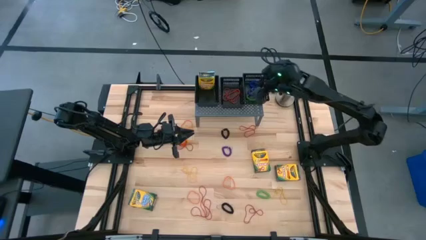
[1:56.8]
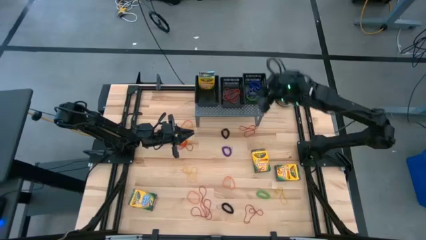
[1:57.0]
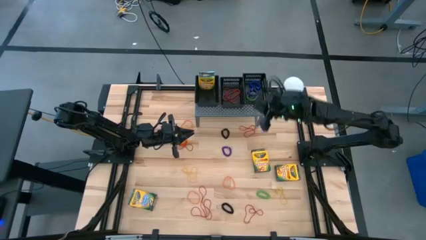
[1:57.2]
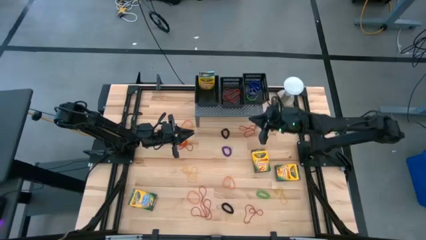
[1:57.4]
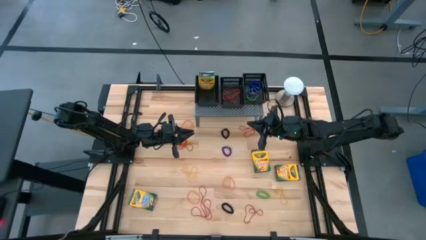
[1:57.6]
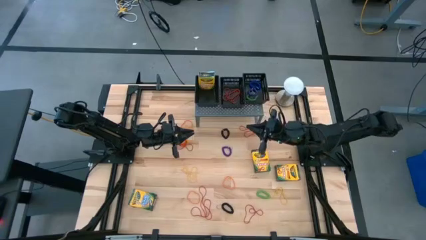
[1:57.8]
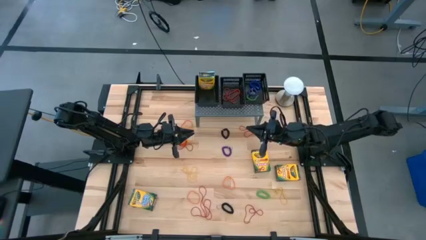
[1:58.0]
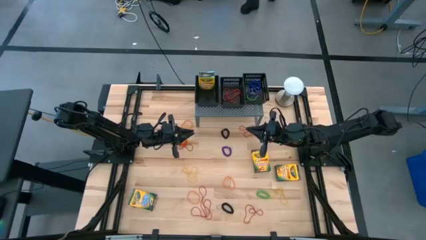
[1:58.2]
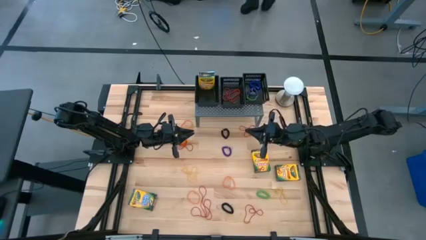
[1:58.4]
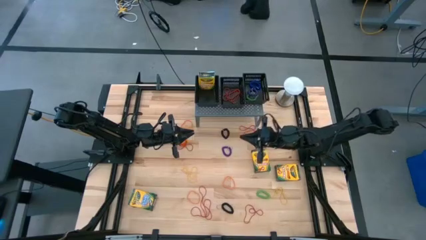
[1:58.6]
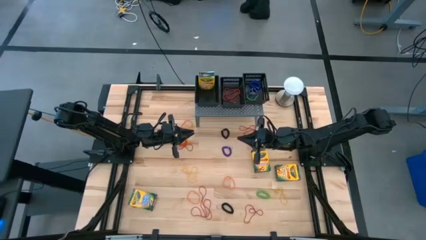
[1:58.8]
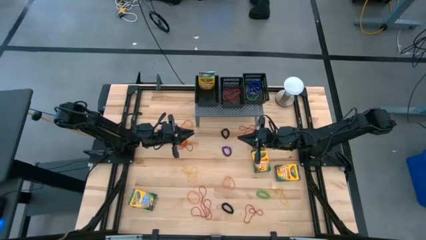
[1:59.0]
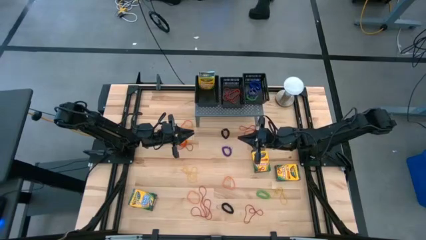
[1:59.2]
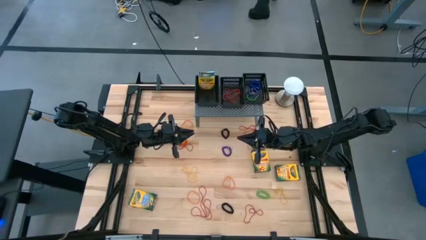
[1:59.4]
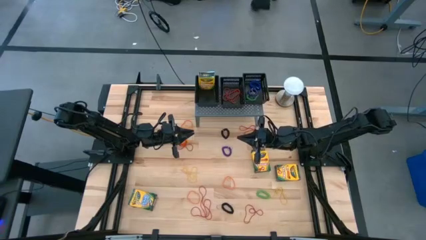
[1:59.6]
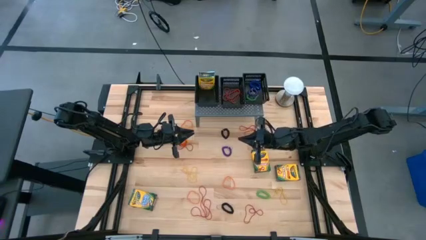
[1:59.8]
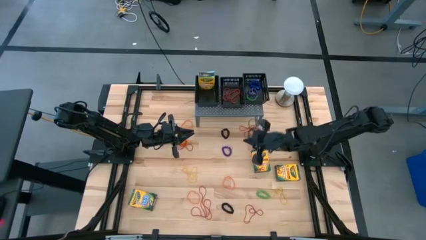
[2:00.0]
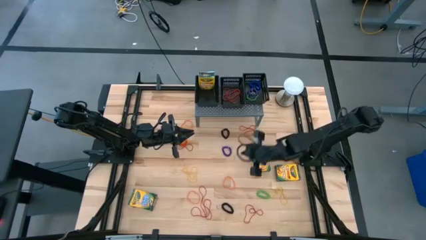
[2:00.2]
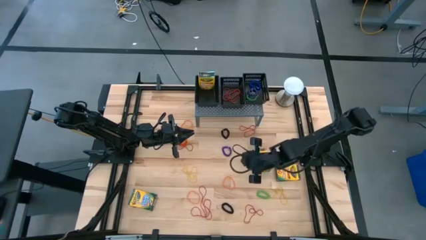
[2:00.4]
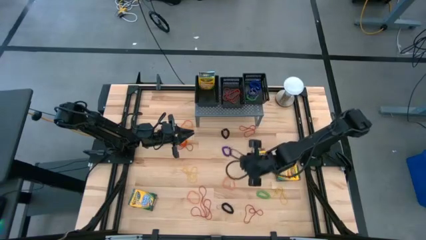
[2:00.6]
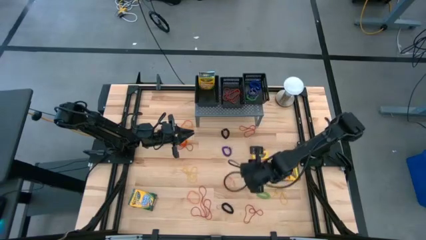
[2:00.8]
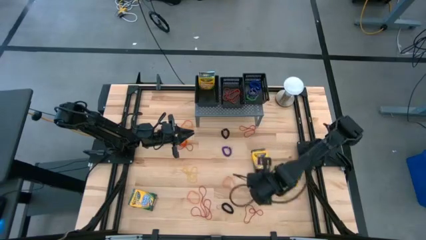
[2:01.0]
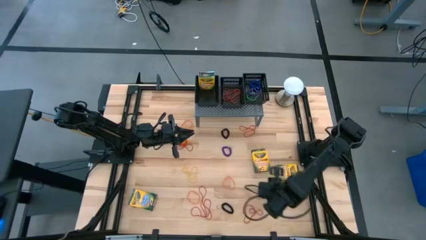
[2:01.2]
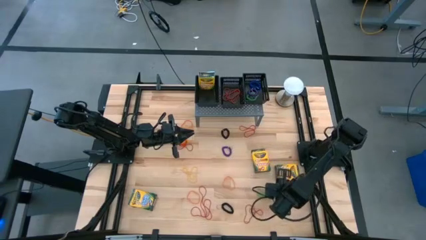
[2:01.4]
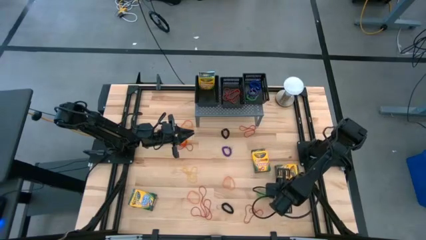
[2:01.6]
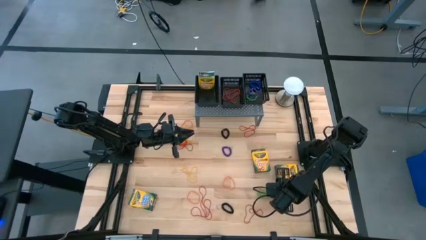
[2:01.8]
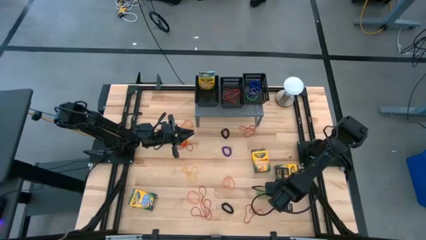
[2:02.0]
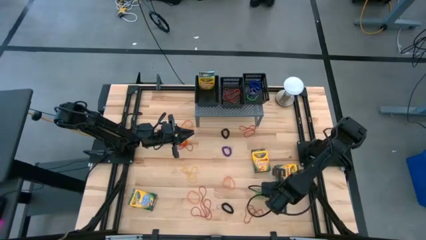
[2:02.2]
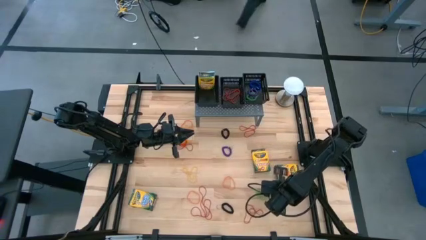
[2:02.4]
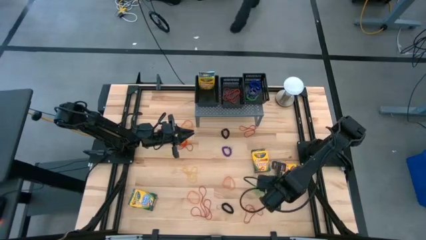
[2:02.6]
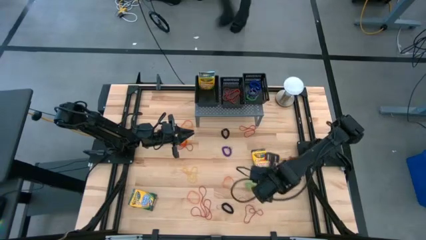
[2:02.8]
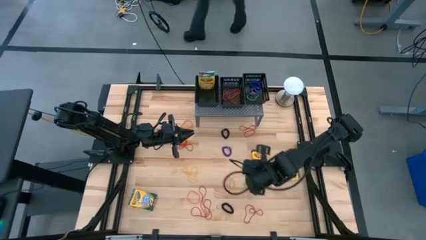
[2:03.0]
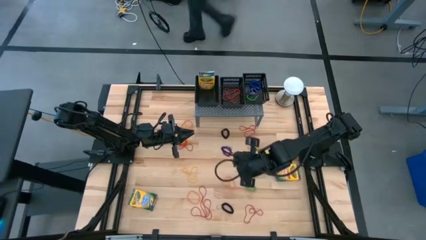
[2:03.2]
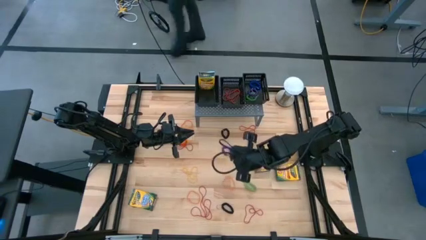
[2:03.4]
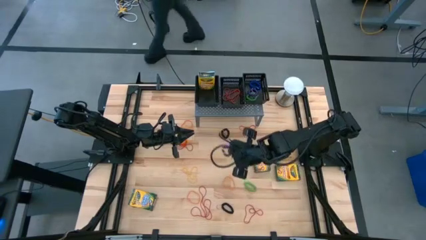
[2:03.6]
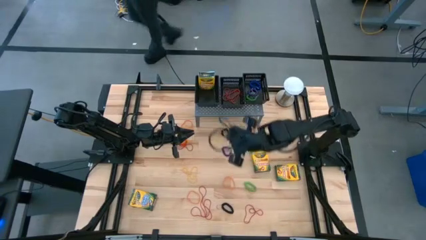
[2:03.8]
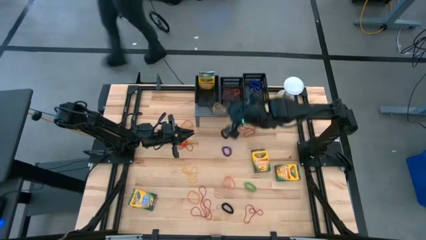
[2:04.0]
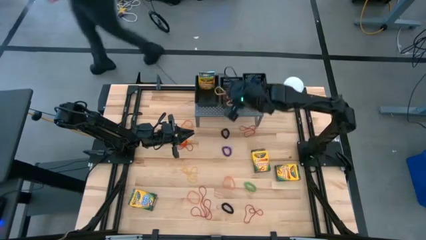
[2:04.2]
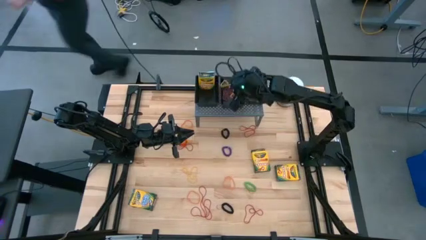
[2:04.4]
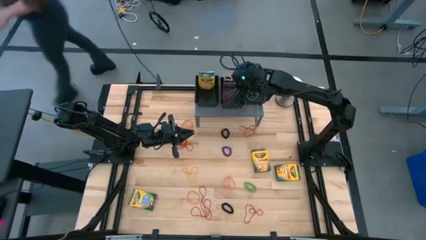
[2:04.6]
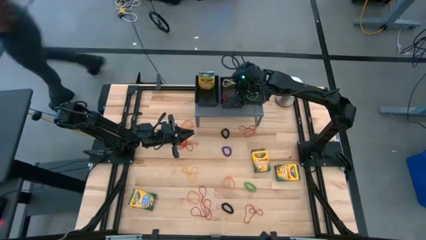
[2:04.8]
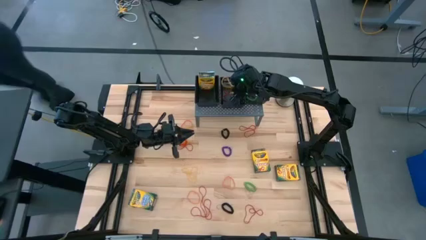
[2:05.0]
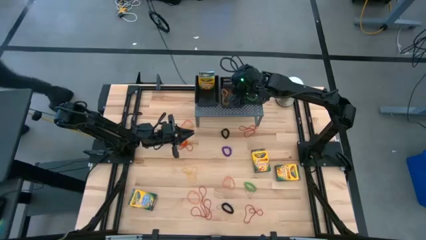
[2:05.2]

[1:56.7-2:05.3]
Task: Sort rubber bands into baskets
Put the yellow rubber band into the middle black basket on the shelf

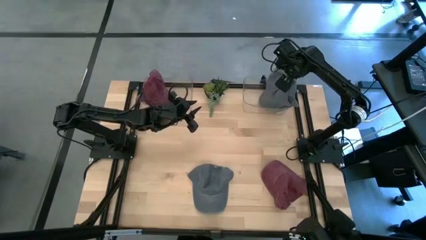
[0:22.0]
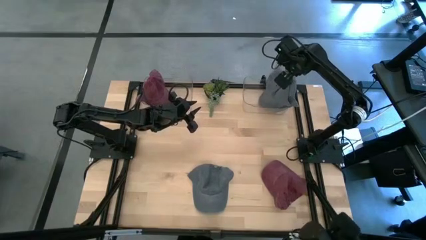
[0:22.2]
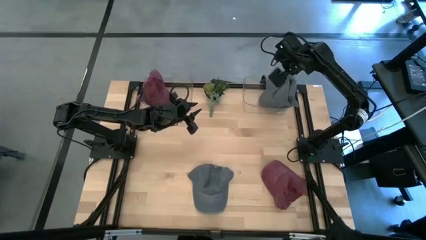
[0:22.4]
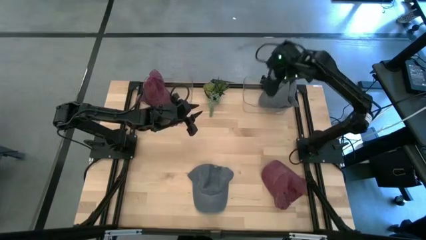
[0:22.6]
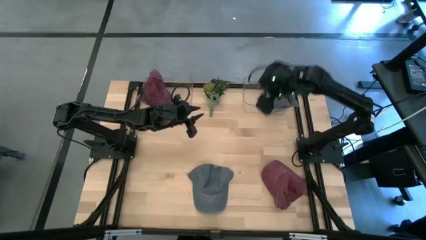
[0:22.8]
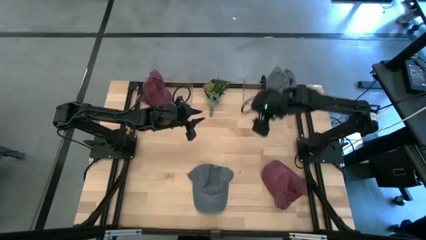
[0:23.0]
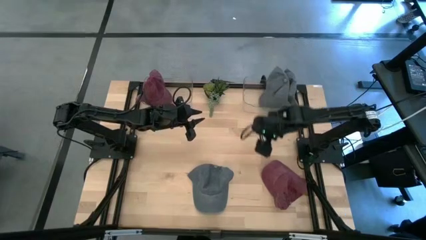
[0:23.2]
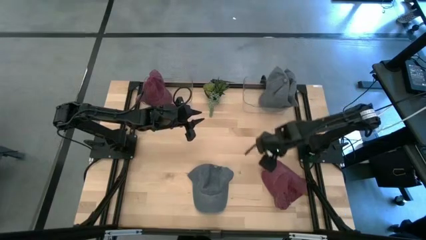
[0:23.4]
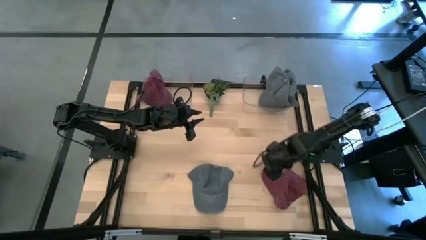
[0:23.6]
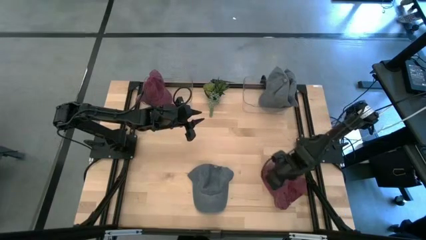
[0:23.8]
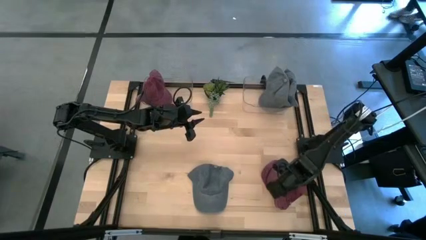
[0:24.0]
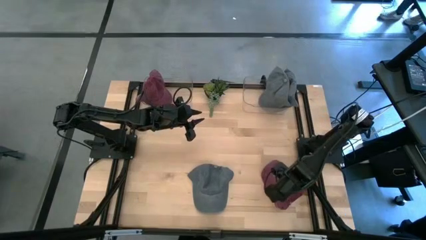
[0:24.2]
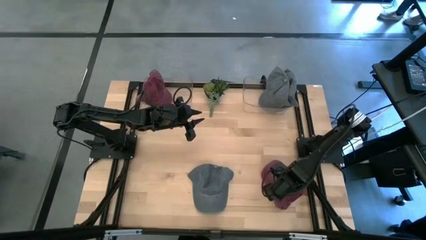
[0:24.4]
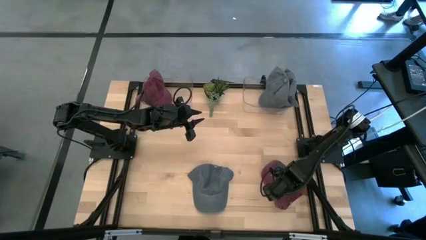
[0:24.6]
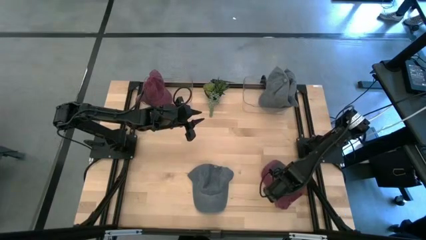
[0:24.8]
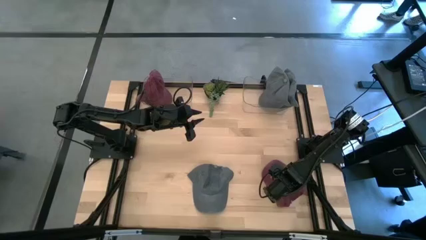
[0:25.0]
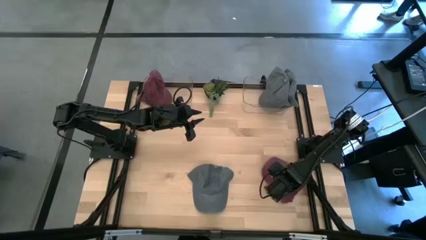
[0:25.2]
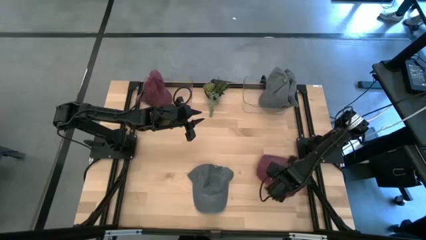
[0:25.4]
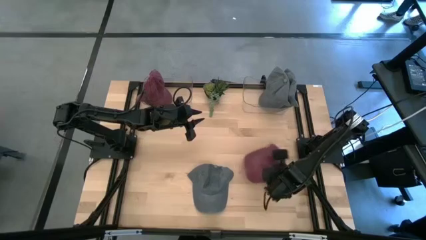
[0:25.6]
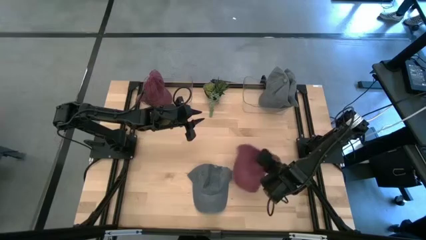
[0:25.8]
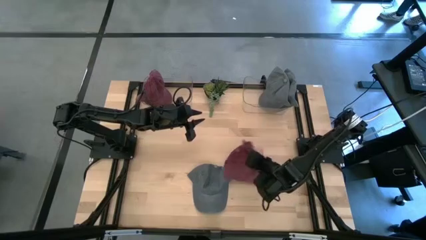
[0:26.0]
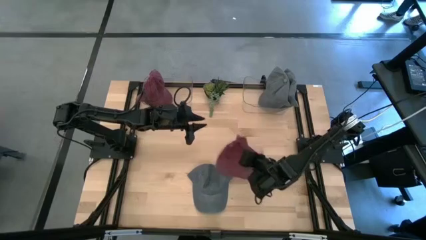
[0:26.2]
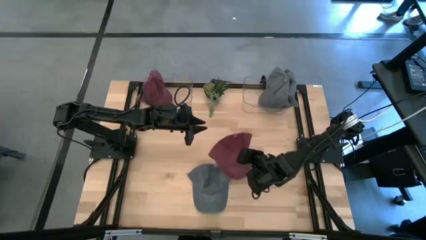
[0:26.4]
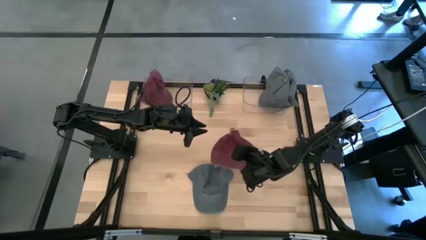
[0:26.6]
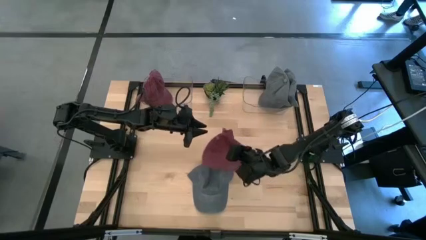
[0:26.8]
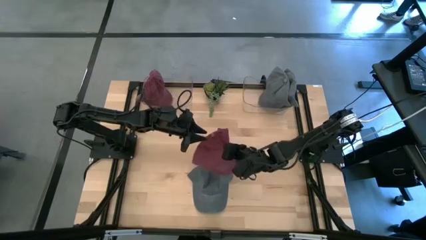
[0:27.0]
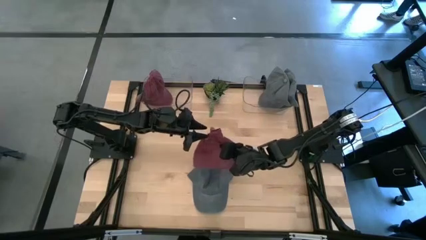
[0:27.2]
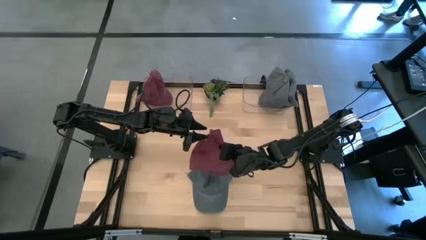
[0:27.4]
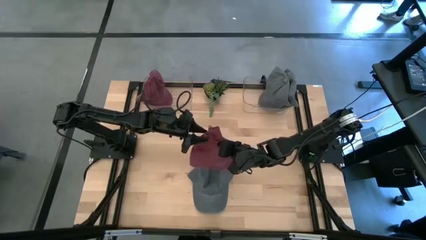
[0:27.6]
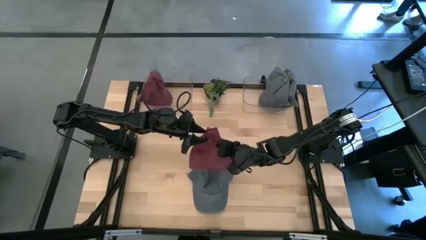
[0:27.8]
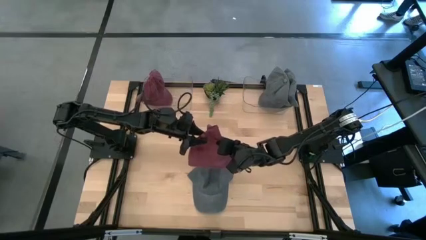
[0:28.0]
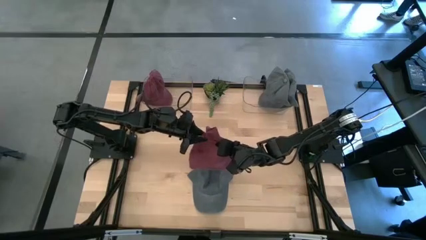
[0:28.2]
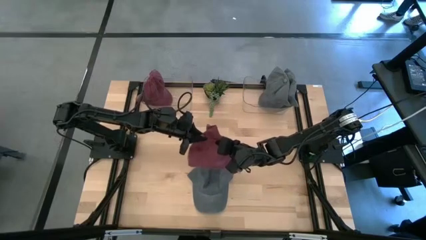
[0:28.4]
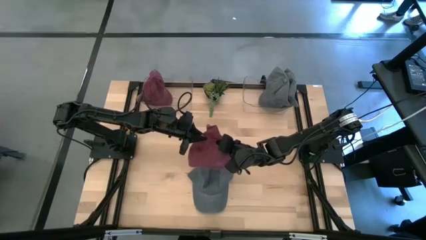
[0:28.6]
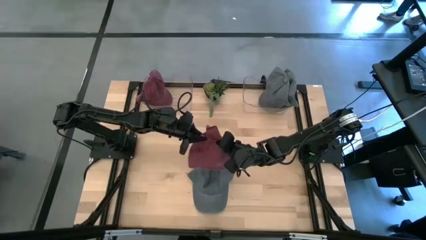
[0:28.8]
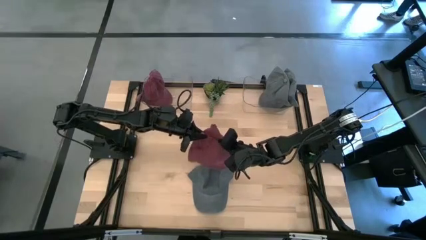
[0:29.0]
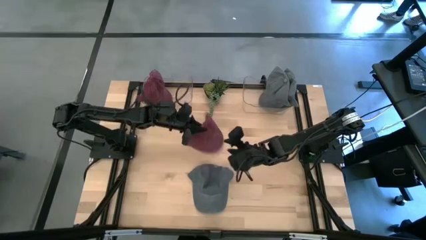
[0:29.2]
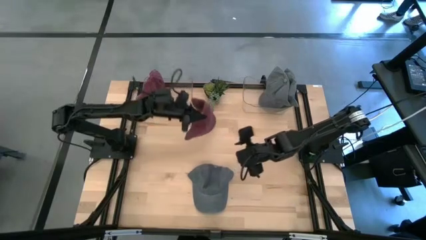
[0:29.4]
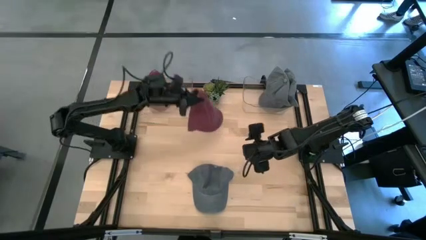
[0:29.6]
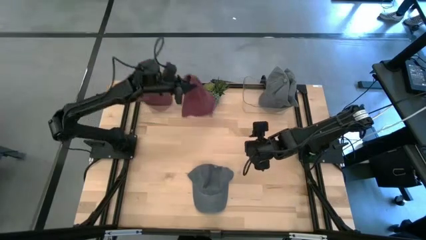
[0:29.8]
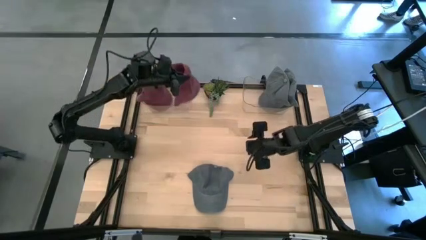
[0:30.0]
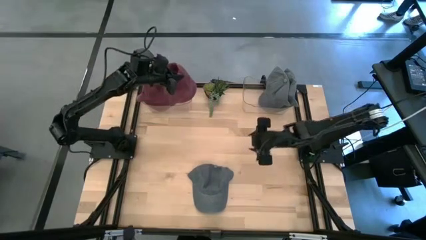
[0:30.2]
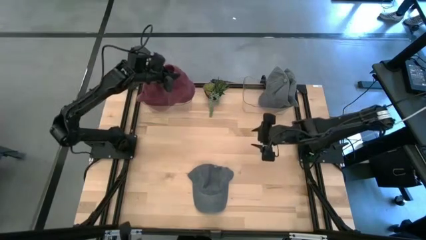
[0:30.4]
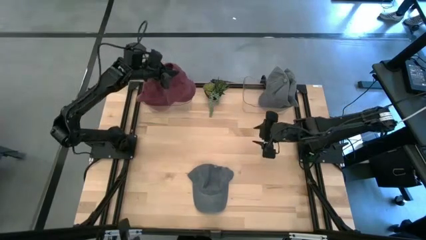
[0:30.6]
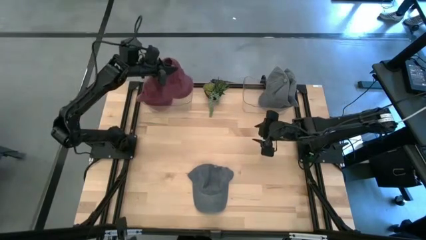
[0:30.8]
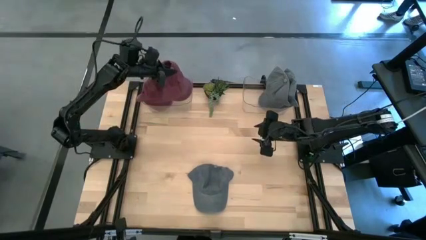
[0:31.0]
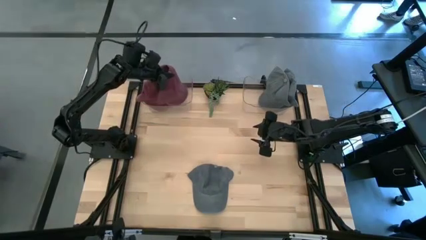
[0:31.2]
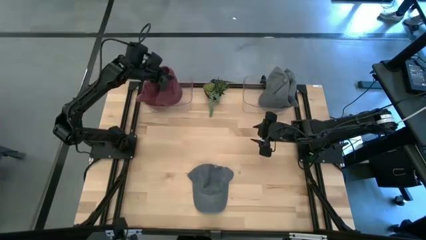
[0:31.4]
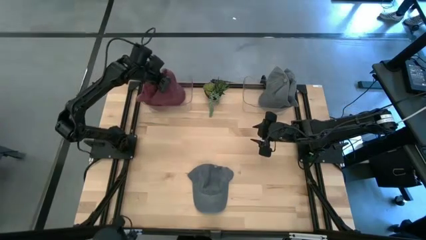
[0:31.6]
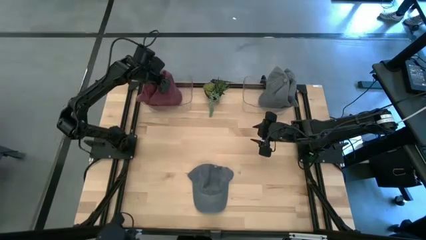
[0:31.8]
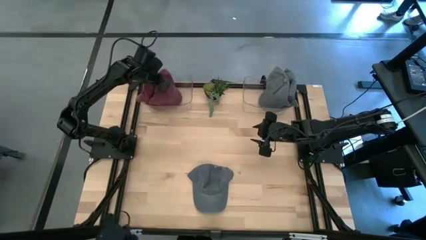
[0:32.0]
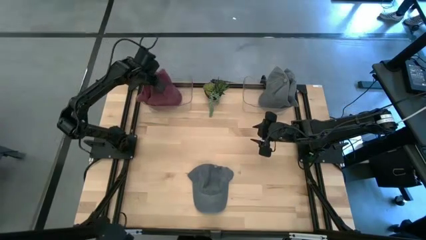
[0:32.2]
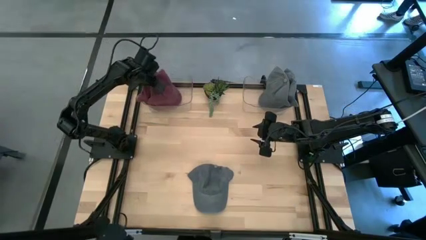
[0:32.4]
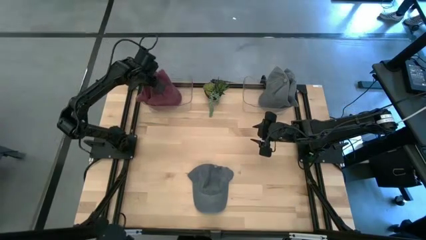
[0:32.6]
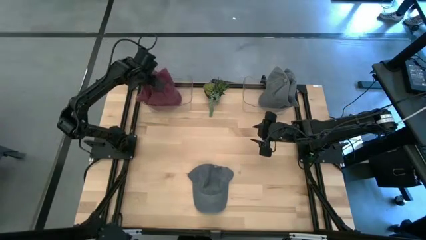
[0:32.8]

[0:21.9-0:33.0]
Task: Pick & Place hat
Put the red cap into the left transparent bin
